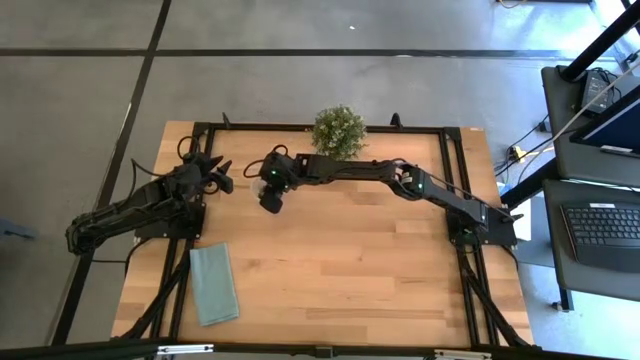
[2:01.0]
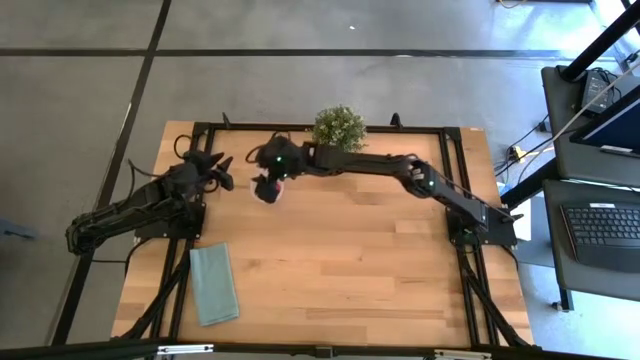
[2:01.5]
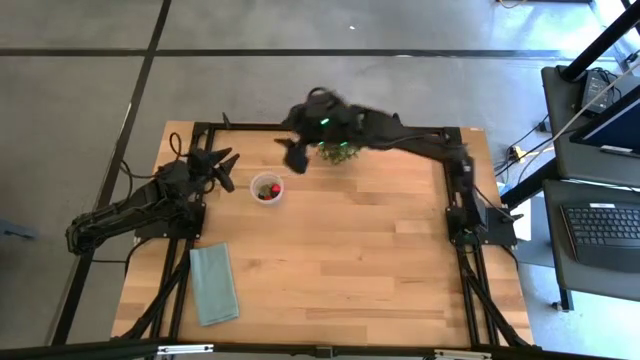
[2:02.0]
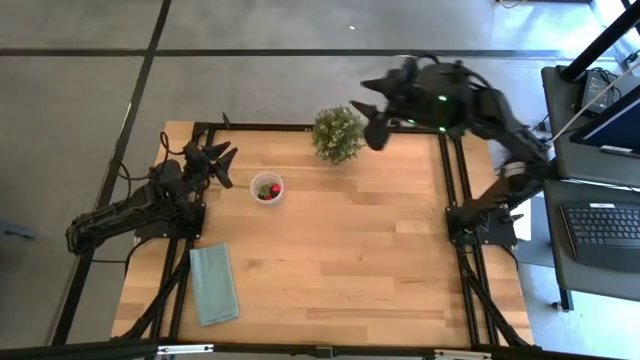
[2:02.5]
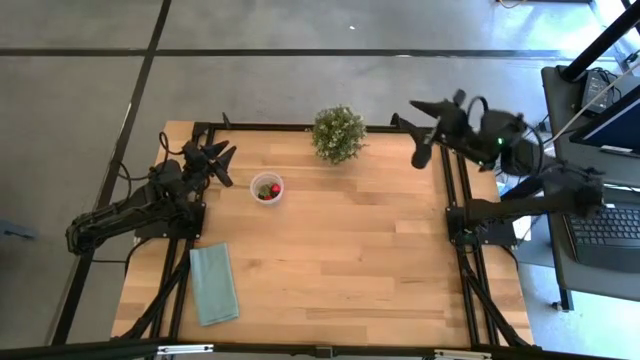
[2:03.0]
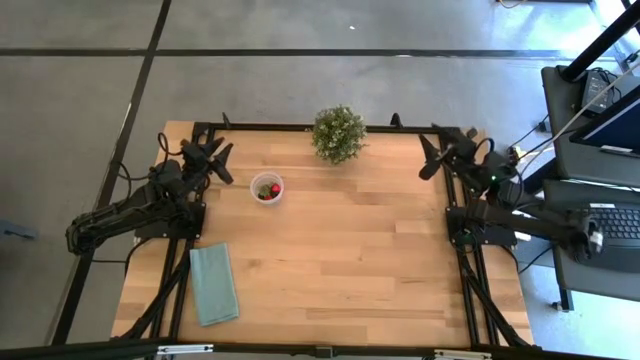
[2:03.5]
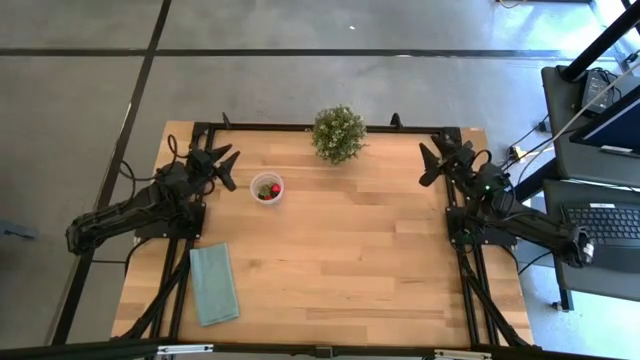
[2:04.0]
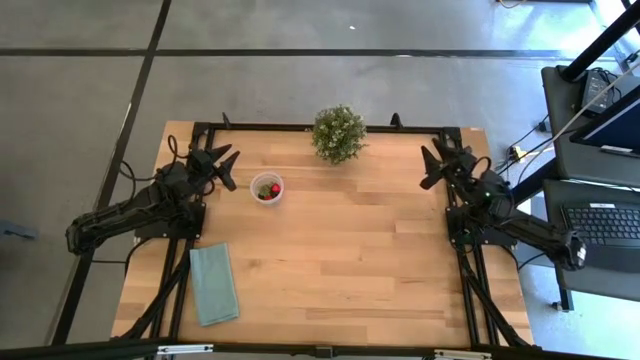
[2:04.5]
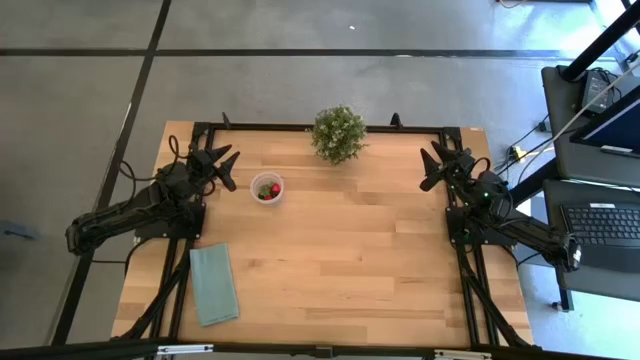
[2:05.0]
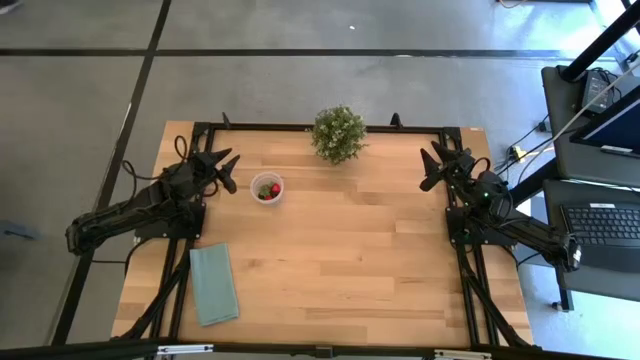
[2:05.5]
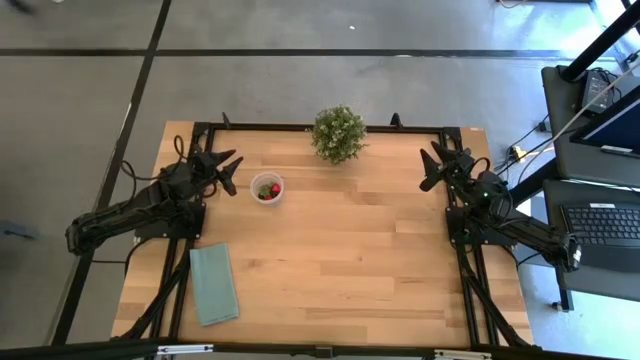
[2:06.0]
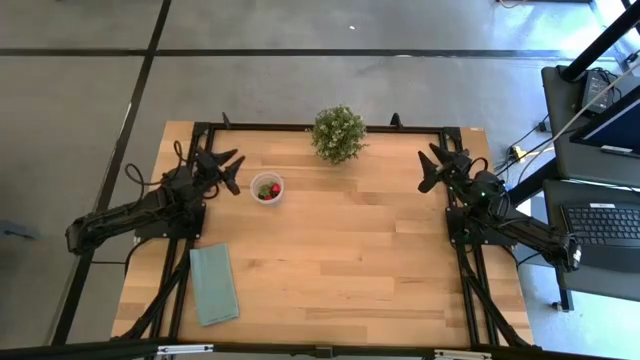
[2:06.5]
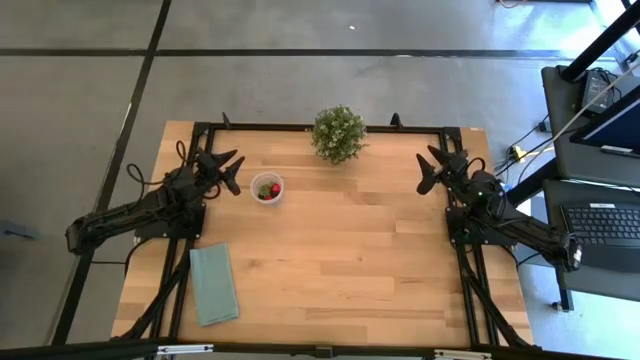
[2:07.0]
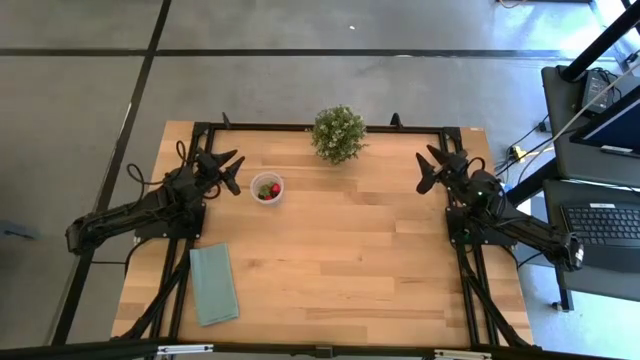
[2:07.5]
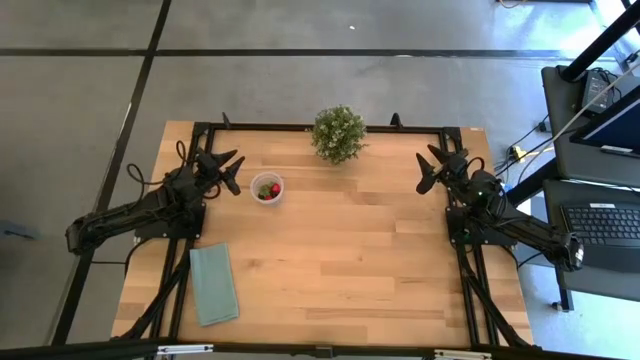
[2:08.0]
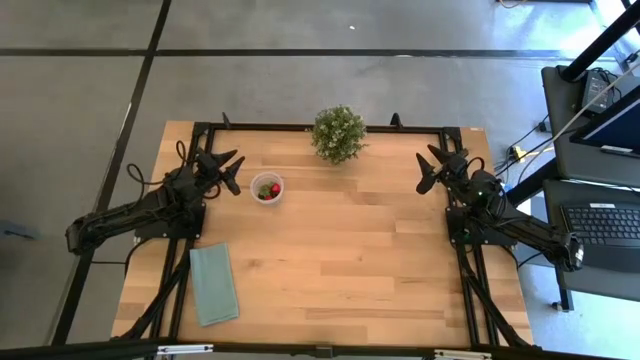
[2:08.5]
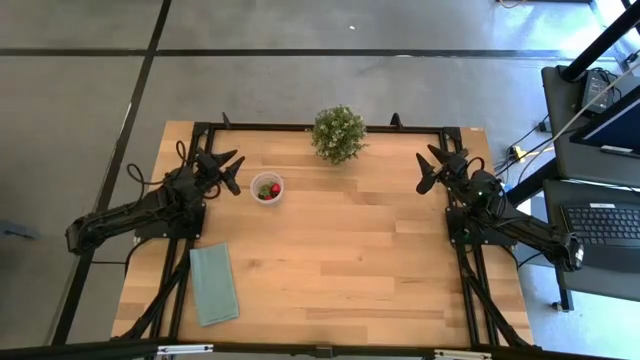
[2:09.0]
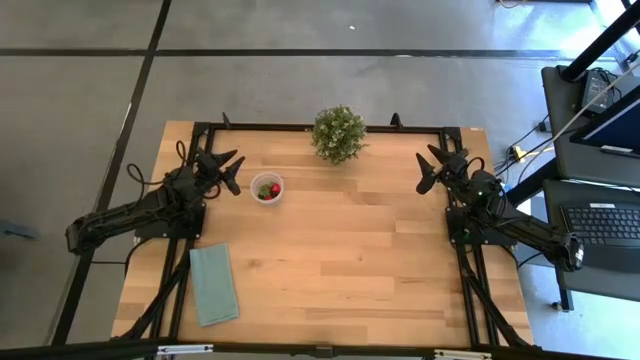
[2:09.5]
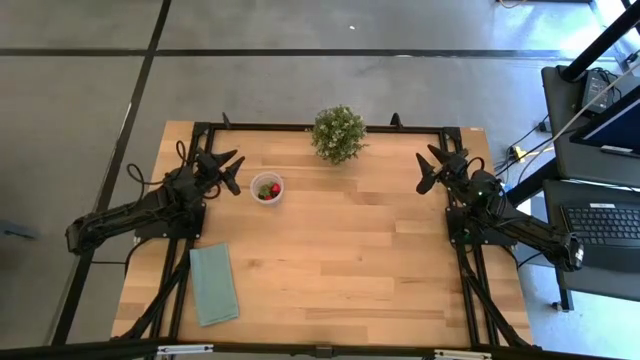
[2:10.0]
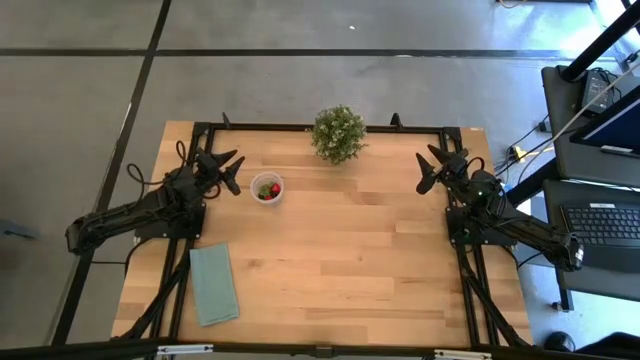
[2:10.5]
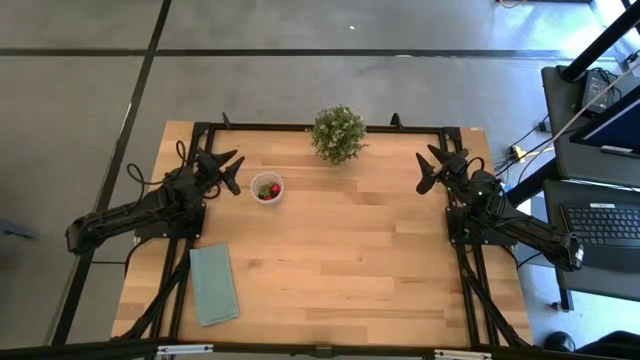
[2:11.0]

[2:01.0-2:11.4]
Task: Pick and placing Produce into tupperware
Return to Home Position

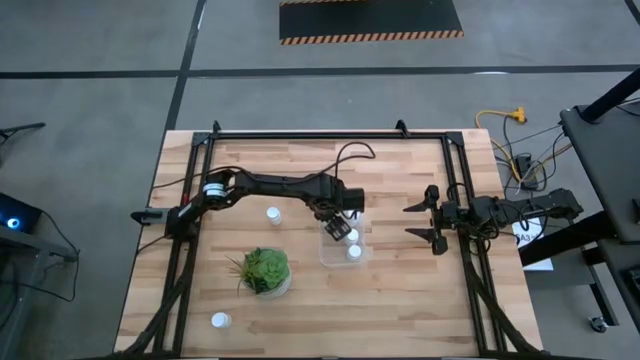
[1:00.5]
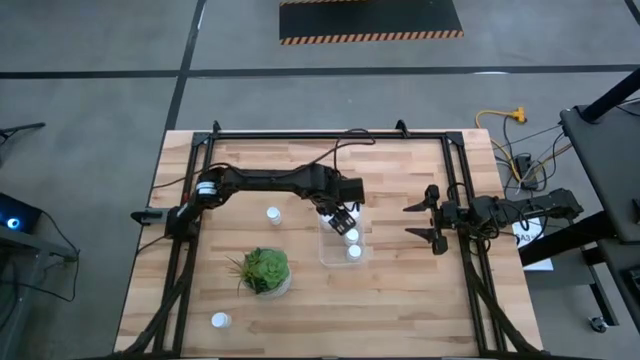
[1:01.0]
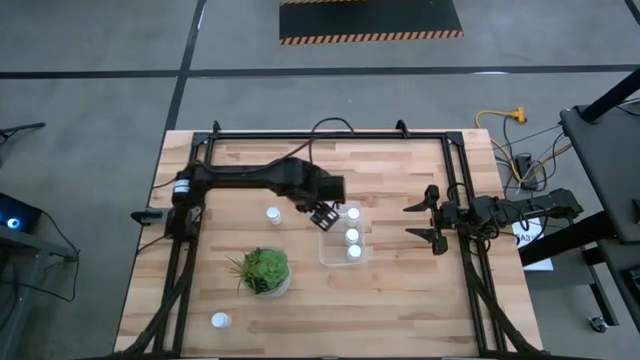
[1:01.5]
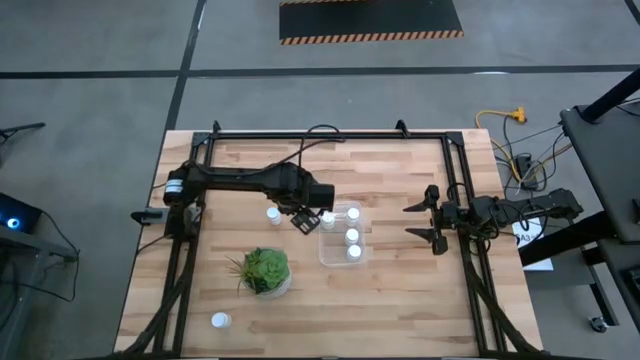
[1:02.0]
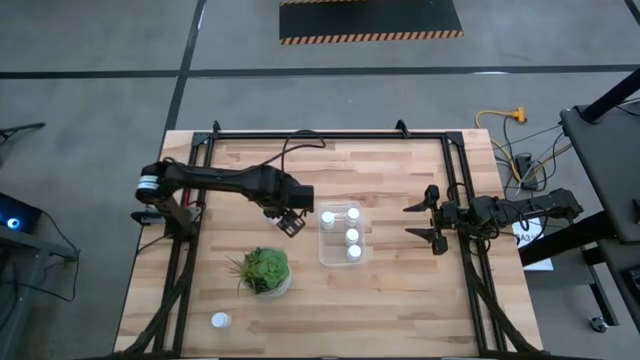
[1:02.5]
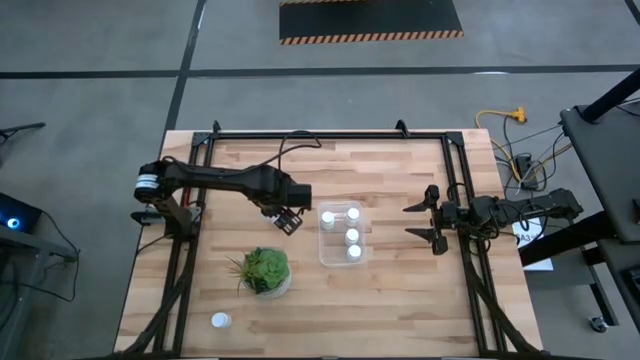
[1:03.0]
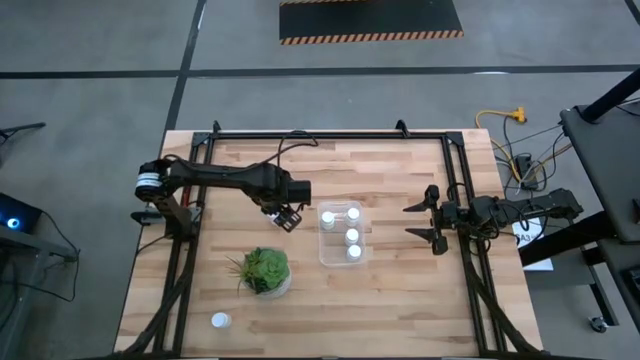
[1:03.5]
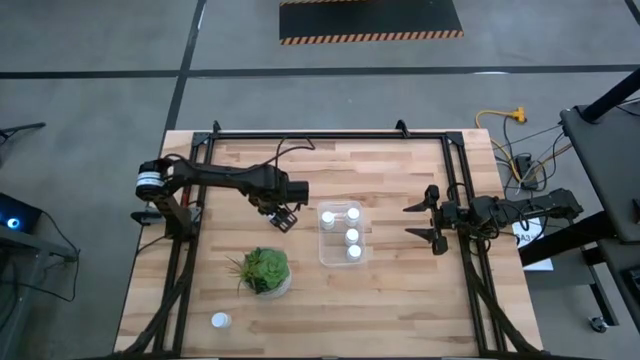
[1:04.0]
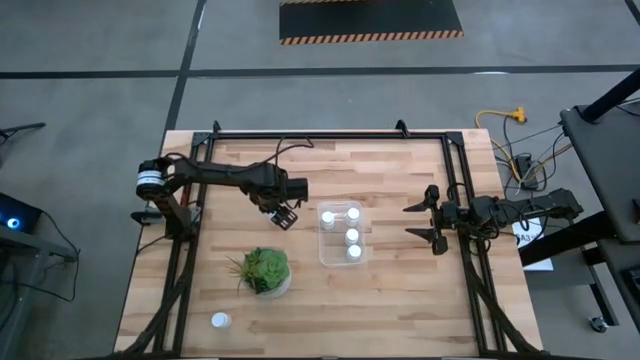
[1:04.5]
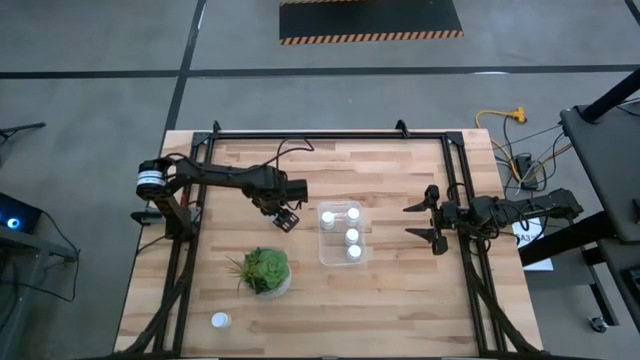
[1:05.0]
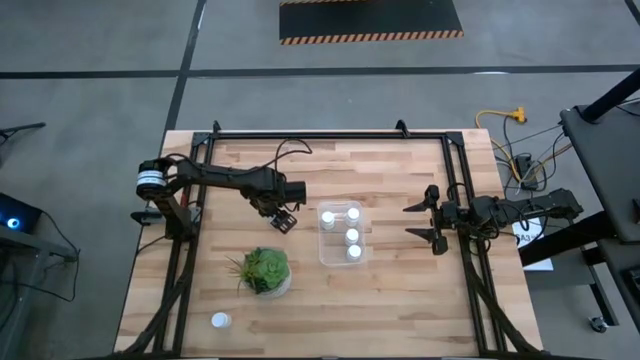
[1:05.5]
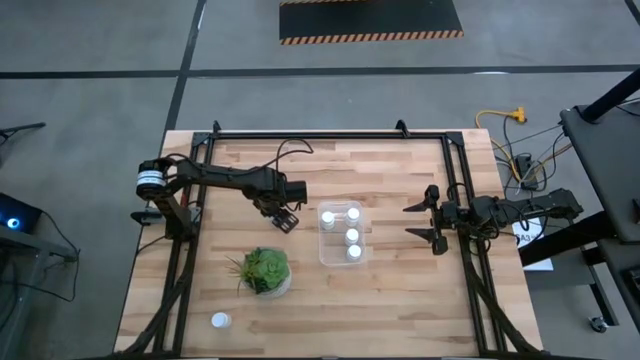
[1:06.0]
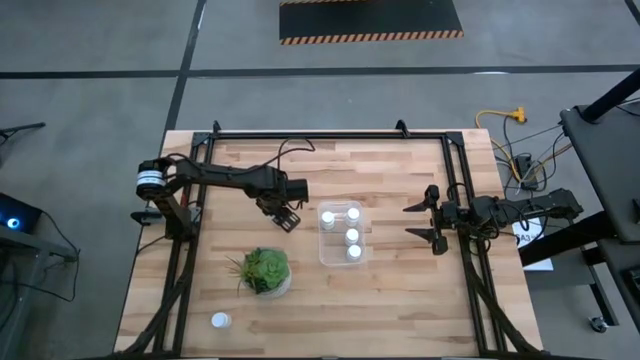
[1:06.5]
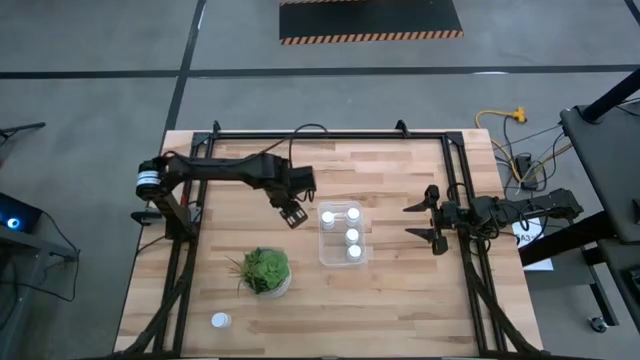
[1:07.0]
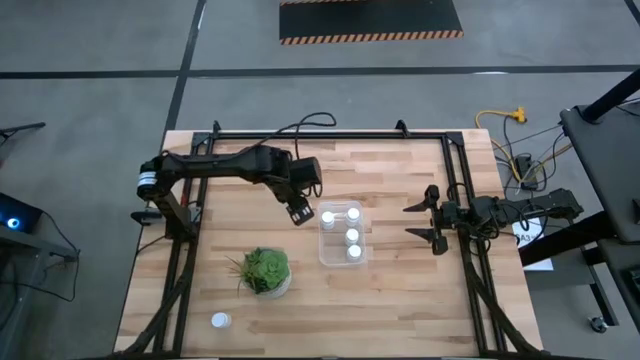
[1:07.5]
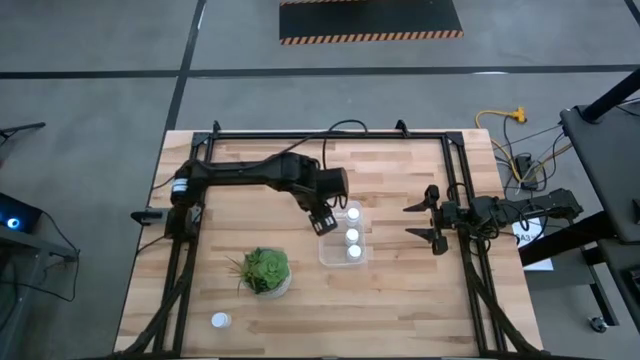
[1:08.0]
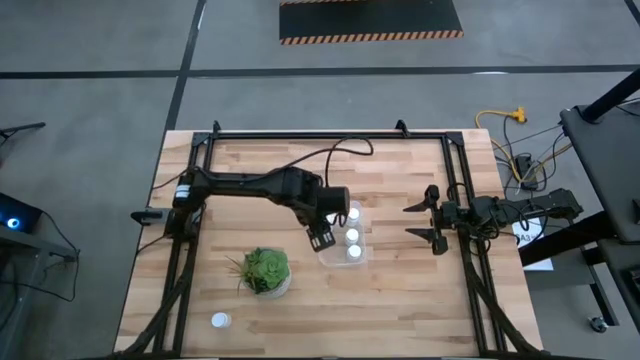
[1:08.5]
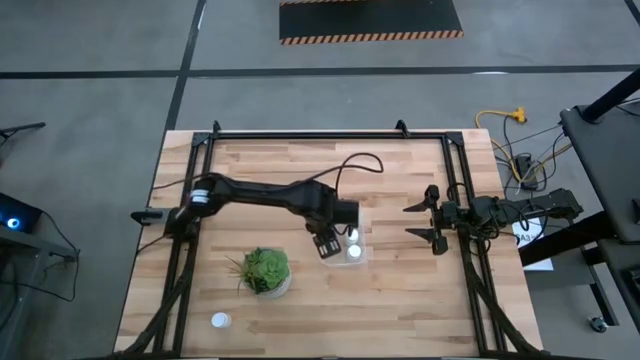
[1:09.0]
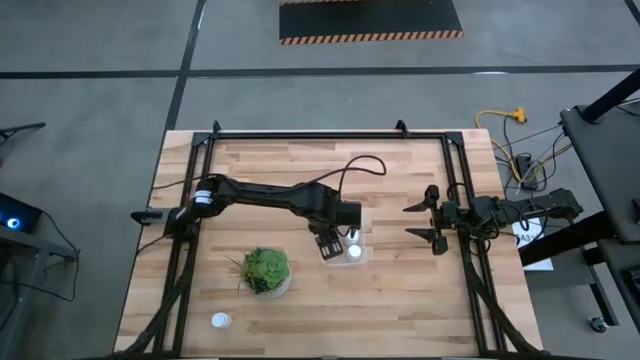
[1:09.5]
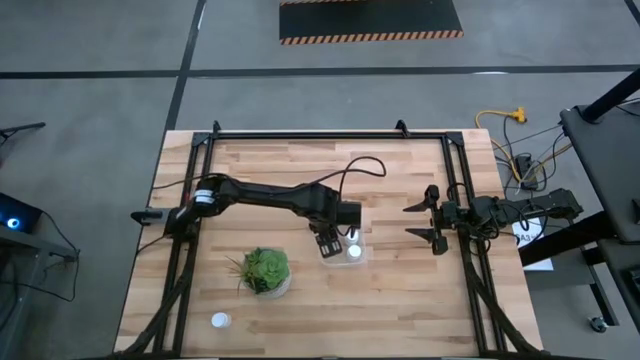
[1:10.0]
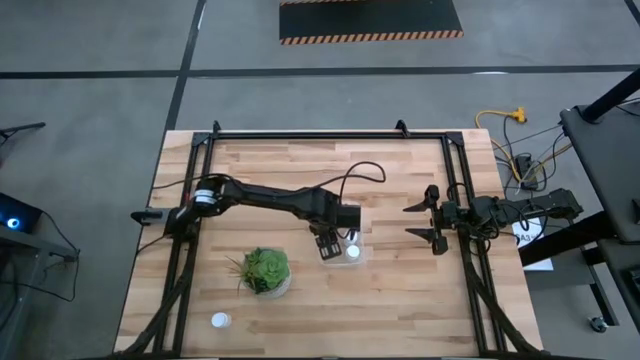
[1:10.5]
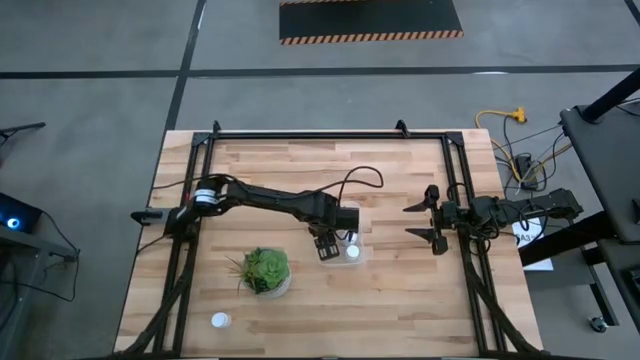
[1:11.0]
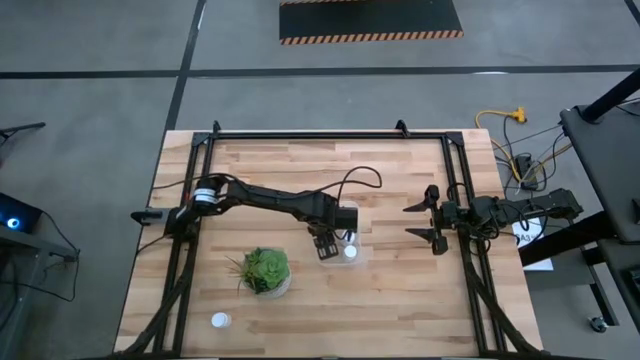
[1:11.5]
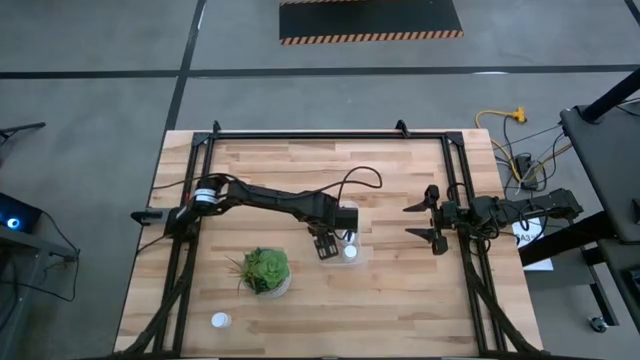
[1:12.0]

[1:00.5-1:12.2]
Task: Pick and place pill bottles into a basket
Put the white medicine bottle into the transparent bin
